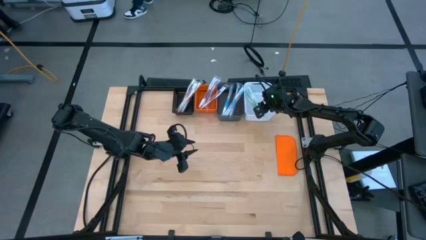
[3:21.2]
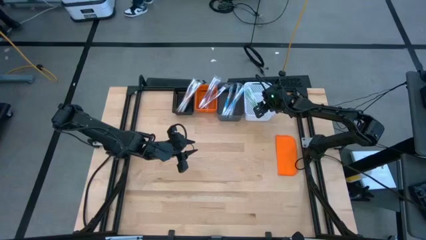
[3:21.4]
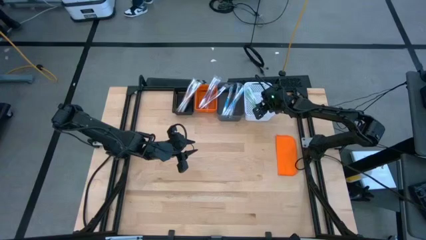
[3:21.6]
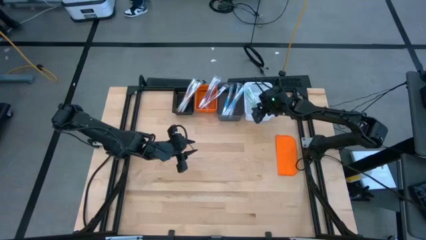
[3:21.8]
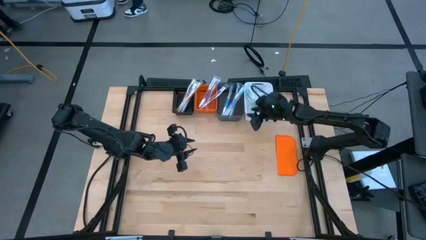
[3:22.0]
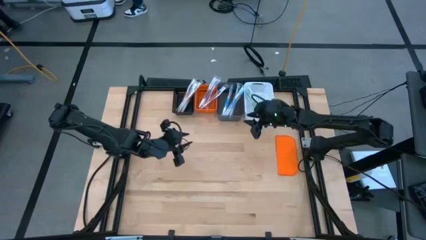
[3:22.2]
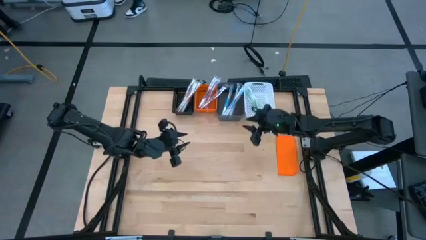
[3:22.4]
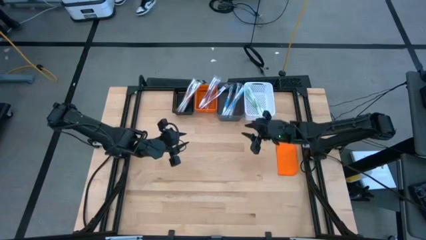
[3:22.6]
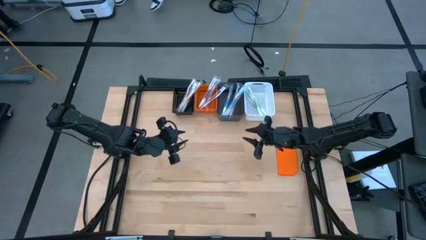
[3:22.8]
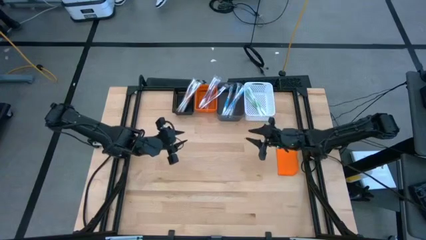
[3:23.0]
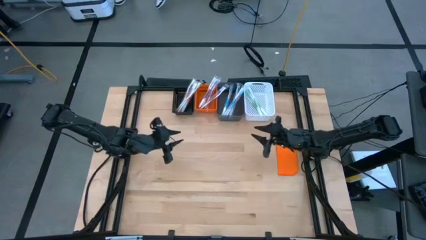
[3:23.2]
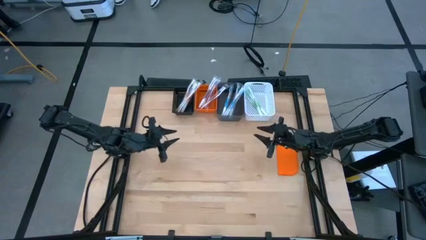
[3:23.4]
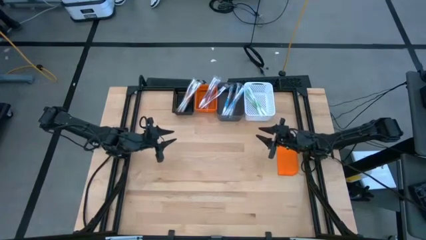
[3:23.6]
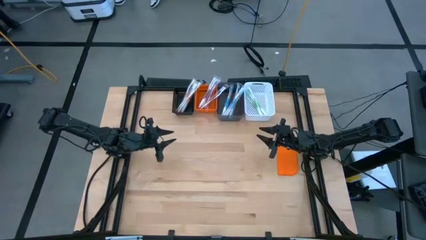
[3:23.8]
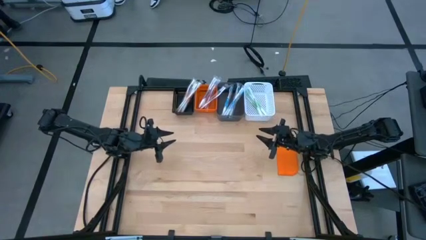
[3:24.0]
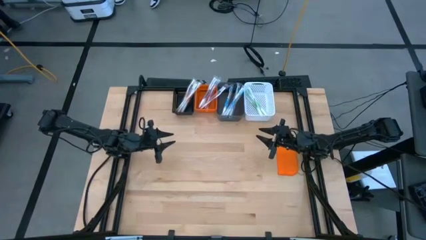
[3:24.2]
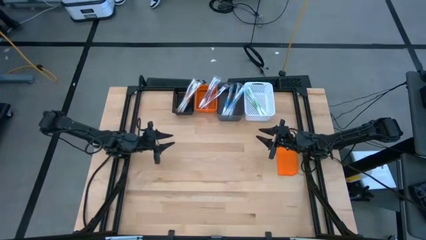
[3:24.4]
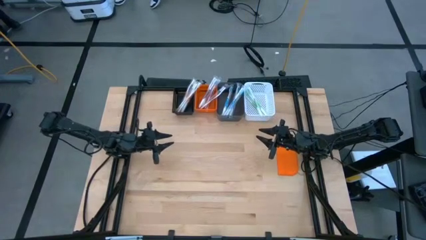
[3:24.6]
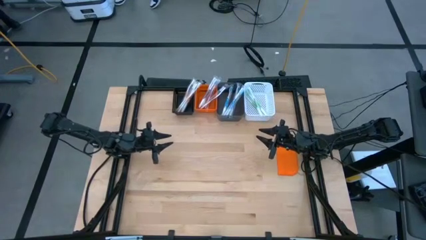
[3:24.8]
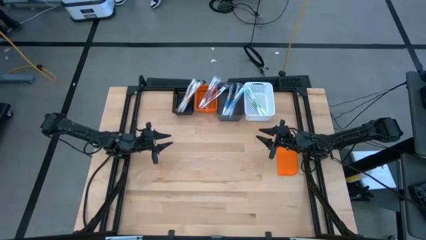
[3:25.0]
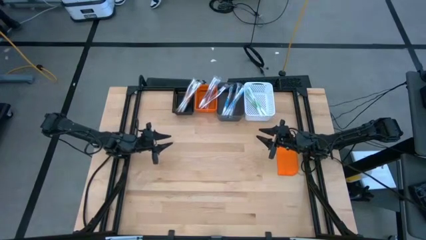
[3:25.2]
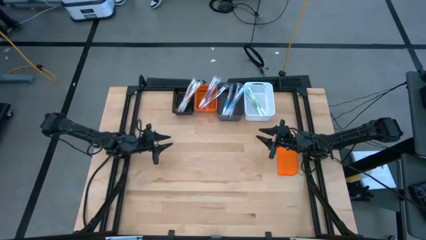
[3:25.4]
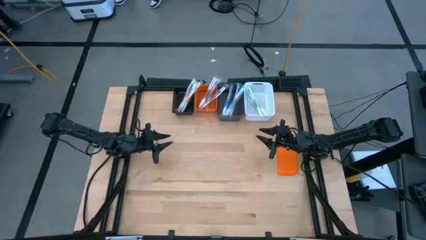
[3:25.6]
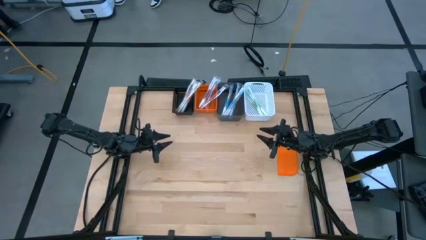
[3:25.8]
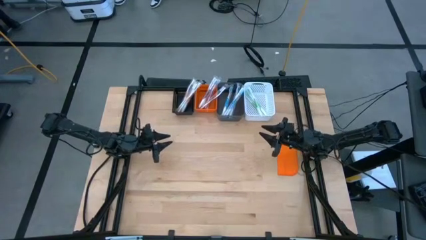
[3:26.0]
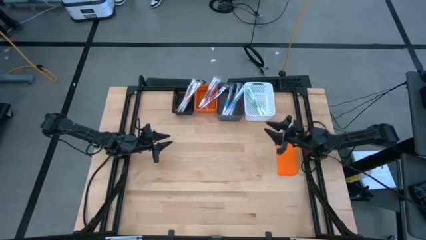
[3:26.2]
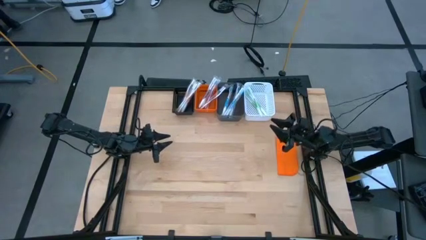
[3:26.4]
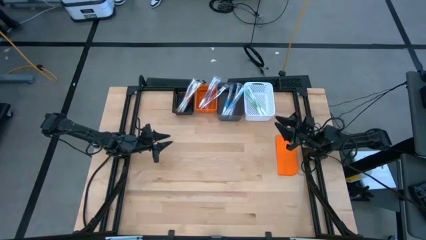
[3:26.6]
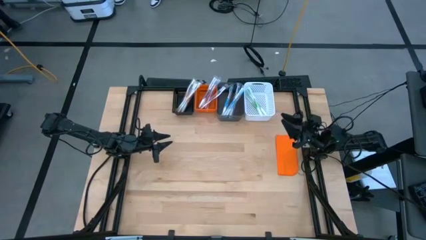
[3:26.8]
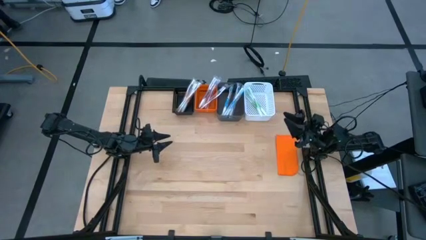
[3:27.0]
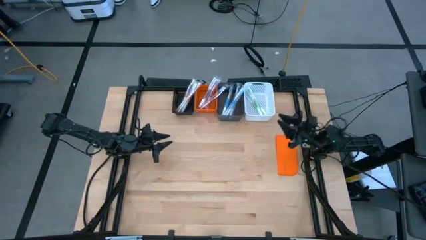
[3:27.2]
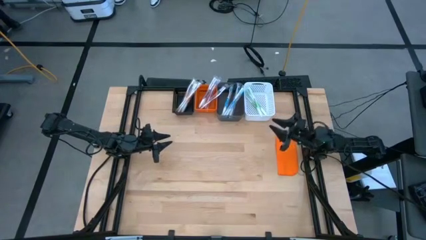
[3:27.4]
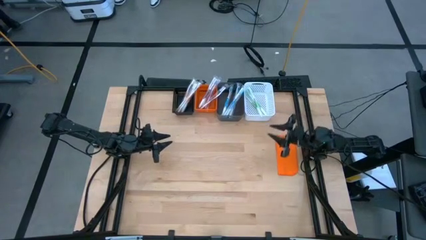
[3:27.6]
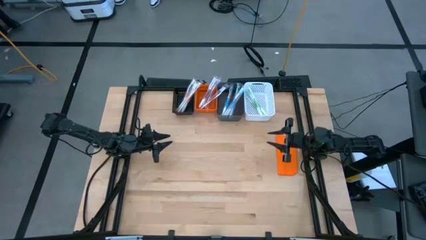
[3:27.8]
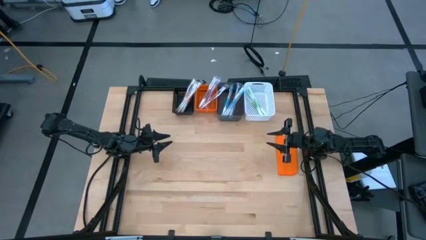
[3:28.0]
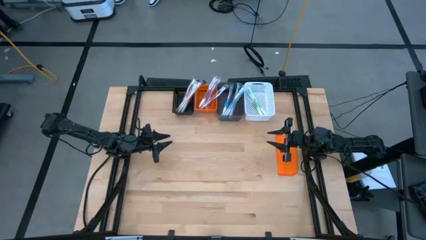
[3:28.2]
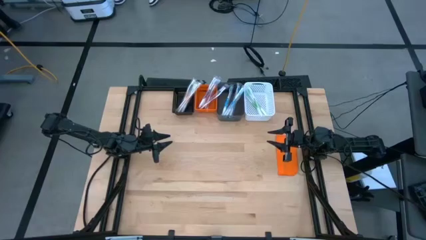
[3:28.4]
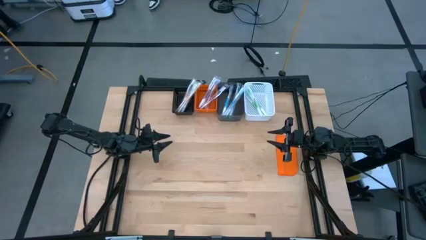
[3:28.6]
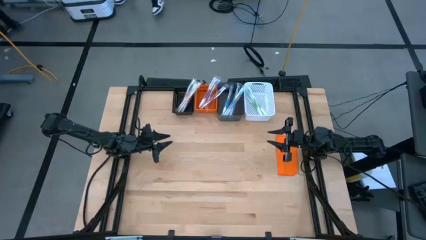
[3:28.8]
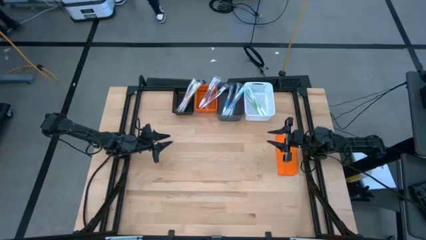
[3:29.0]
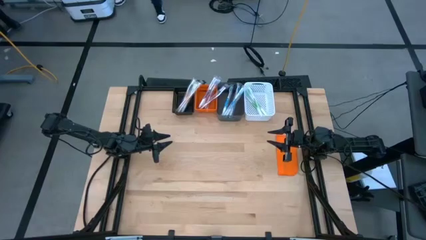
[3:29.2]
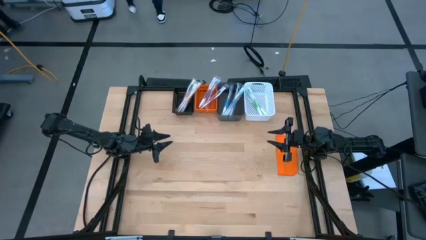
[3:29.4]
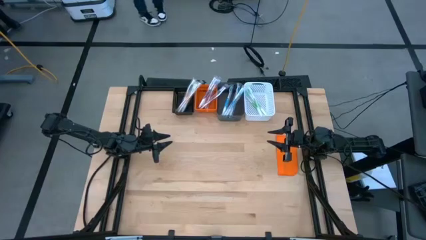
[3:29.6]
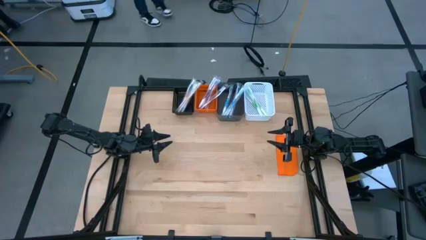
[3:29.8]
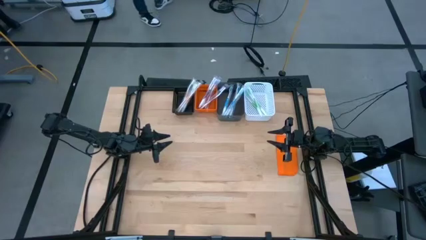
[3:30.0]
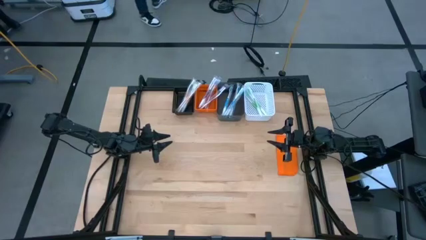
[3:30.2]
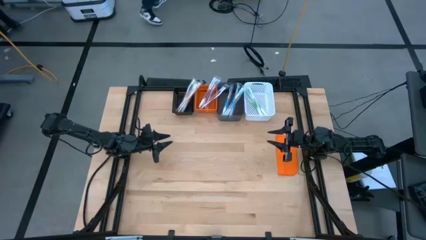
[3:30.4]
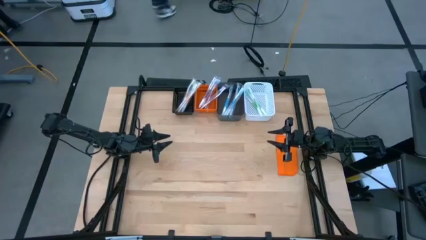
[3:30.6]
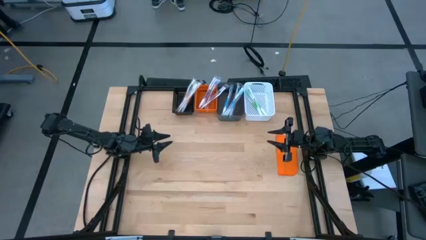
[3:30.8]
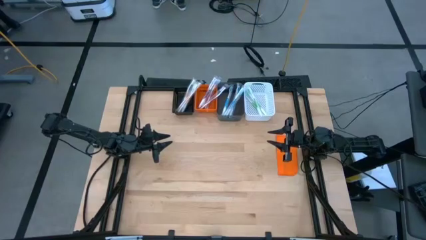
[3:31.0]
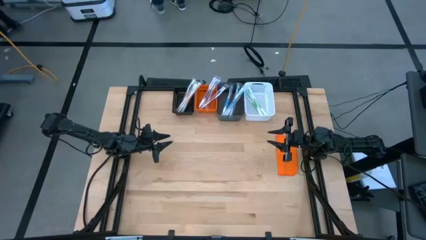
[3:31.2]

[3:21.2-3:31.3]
Task: Pick & Place Toothbrushes
Return to Home Position

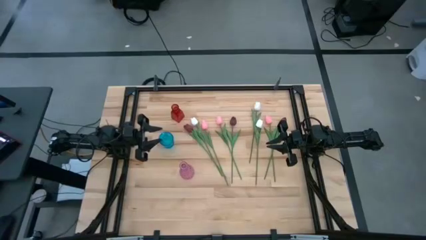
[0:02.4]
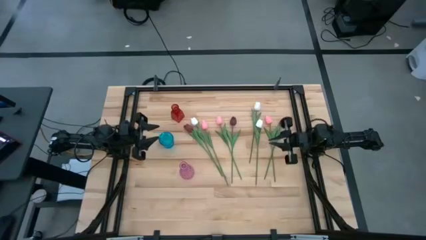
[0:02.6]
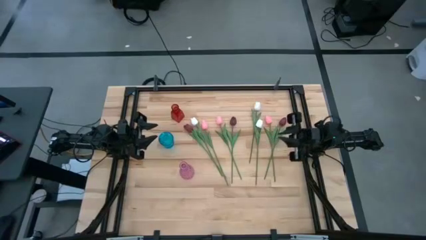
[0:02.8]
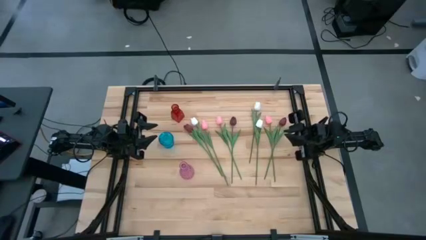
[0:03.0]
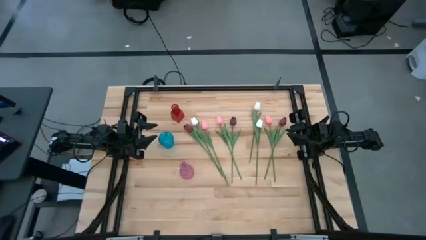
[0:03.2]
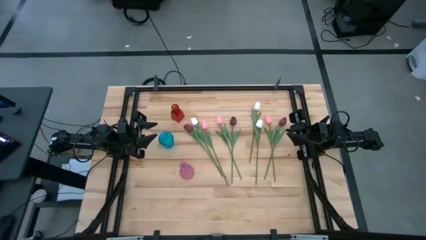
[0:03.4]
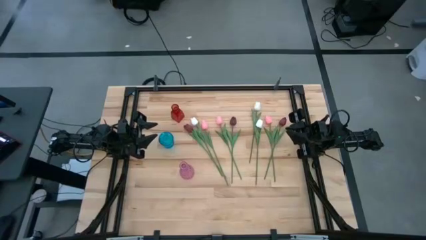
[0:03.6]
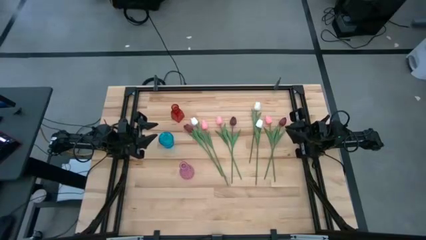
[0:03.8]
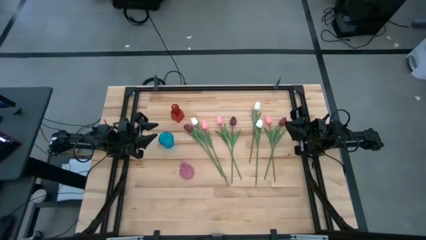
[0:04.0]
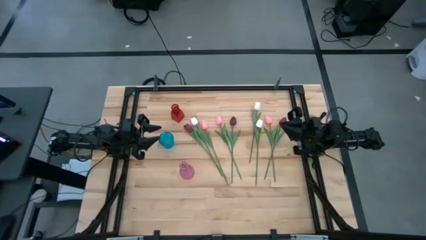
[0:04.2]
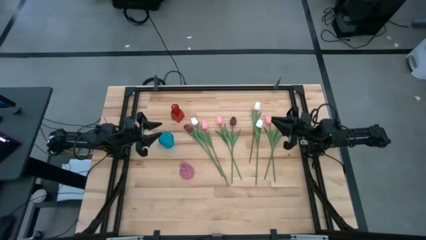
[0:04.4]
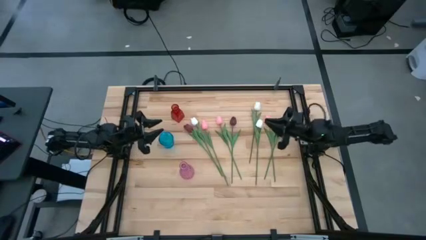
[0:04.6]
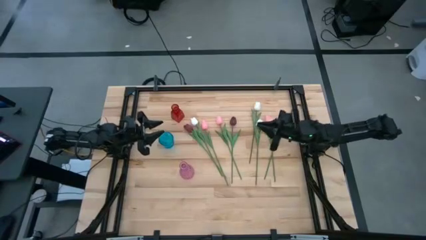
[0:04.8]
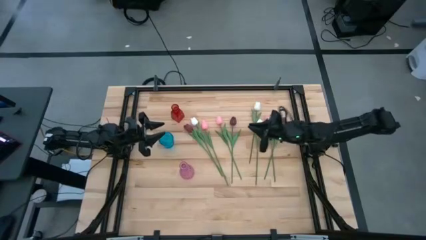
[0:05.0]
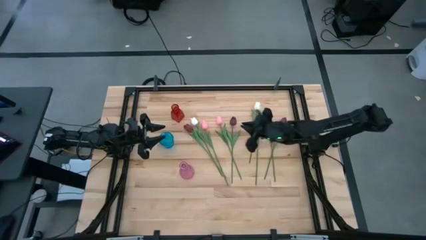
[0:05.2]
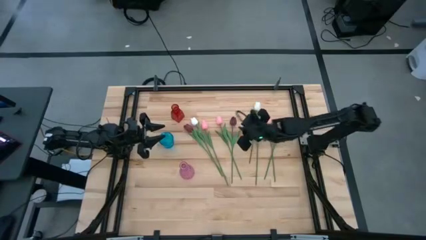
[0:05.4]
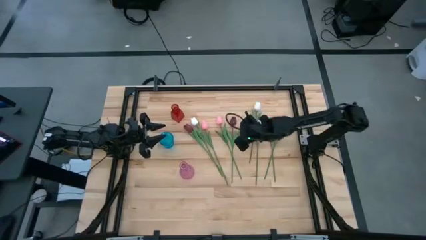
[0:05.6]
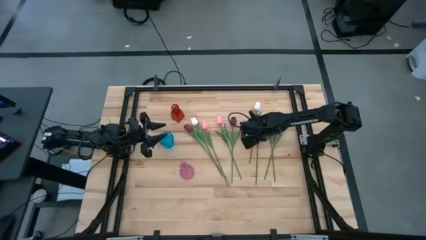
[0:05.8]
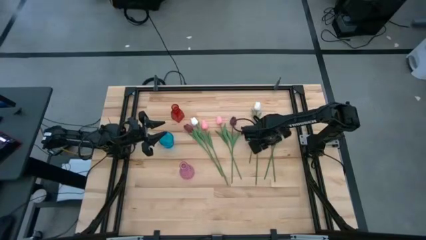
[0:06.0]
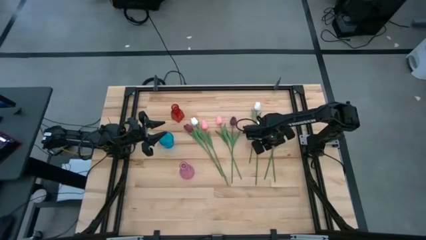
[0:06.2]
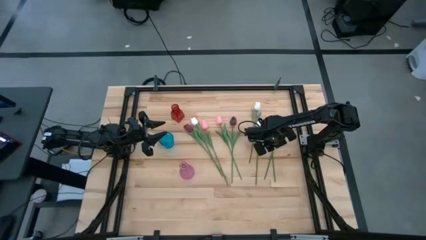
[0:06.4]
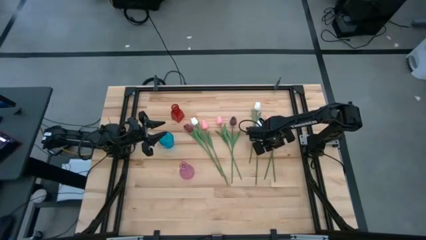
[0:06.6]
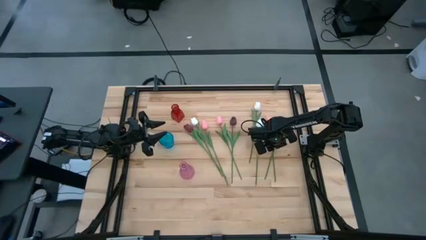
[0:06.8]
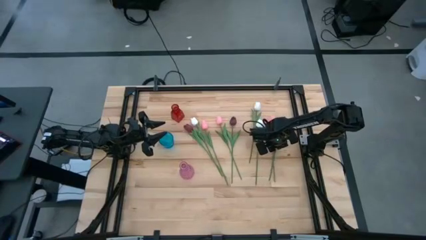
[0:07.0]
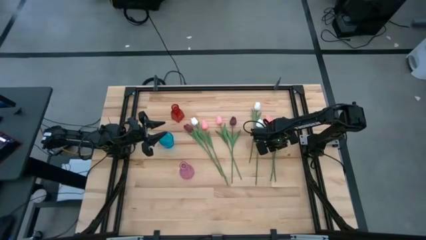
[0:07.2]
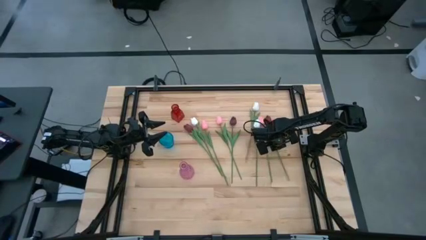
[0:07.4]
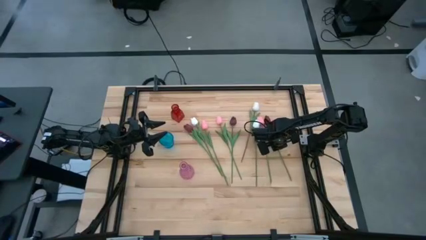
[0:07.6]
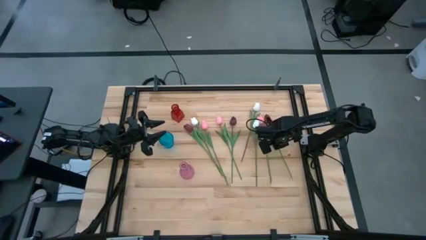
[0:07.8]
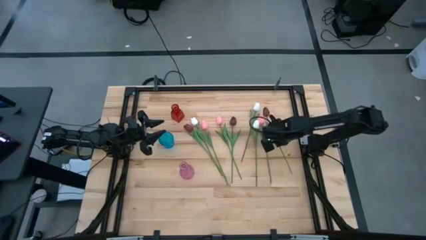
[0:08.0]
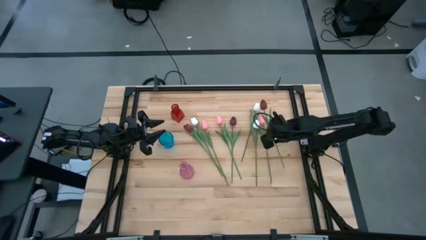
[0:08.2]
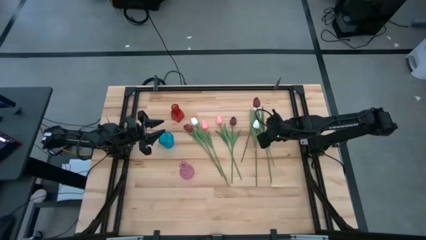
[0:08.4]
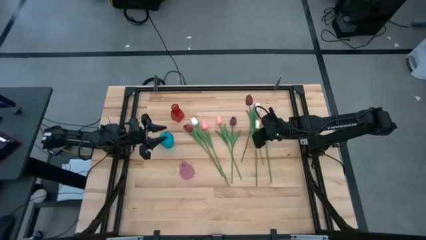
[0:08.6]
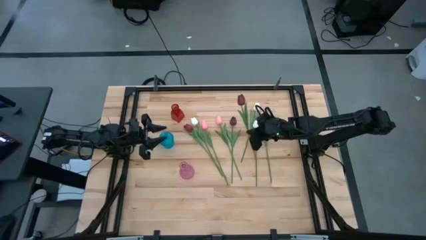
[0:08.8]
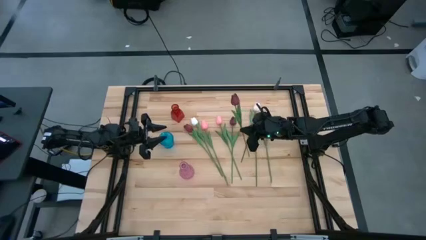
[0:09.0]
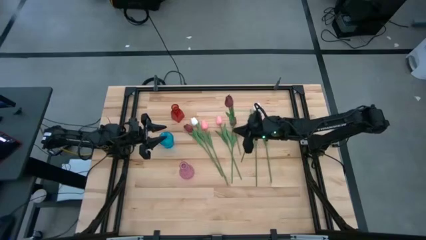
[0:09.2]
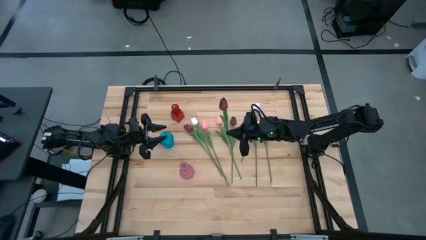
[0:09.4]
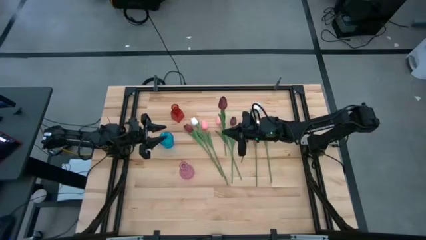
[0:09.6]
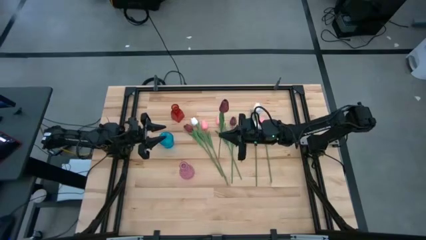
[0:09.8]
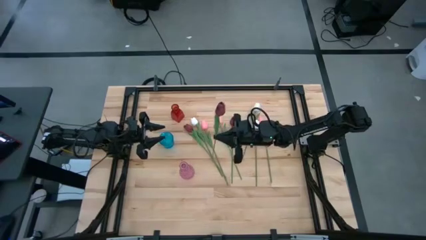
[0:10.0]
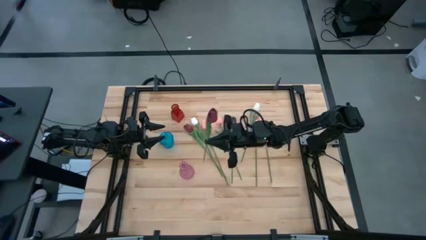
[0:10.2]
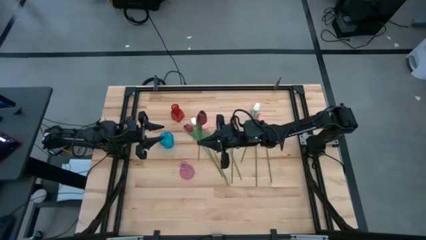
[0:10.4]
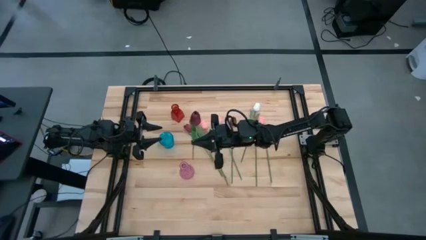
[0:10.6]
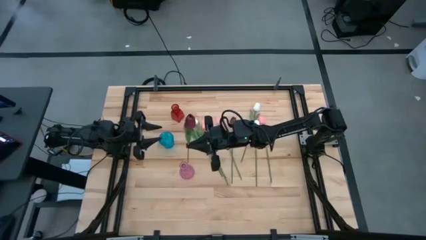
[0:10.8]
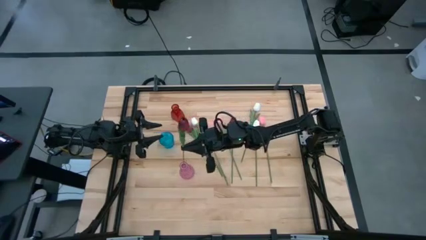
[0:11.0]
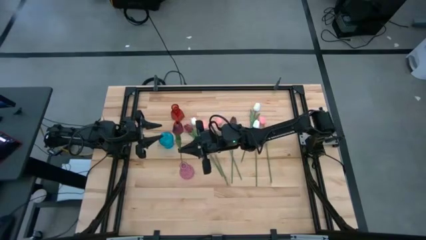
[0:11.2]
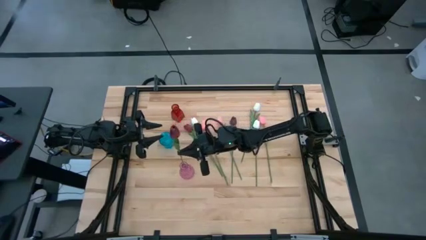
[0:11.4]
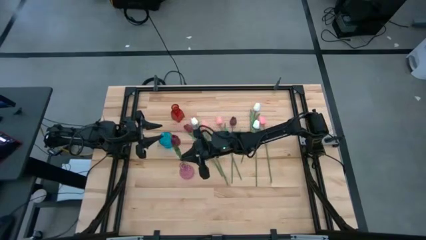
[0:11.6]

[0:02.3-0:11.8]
Task: Sort flowers into vase by color
Put the right red tulip into the pink vase
